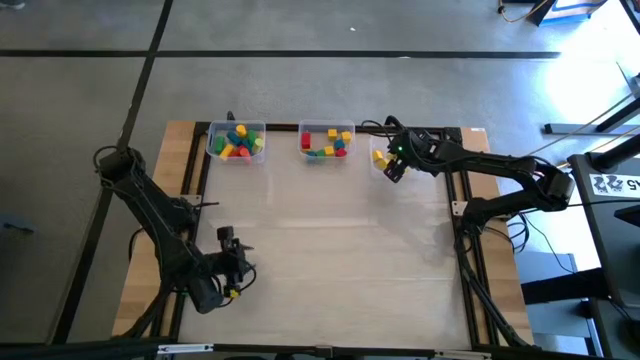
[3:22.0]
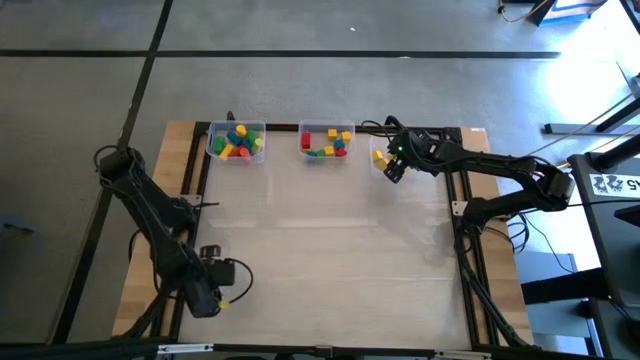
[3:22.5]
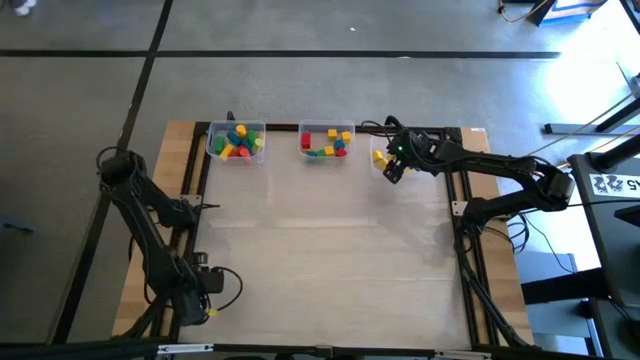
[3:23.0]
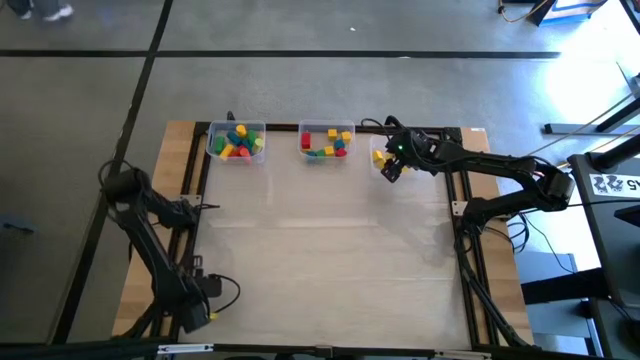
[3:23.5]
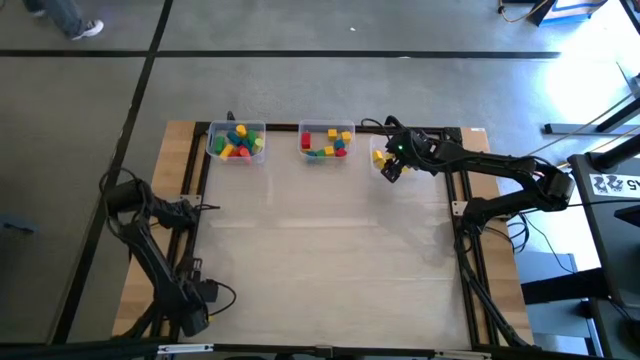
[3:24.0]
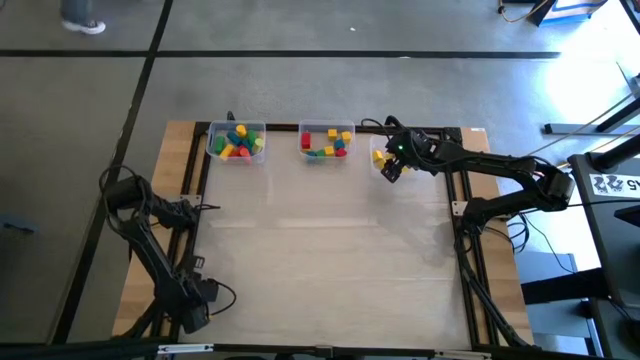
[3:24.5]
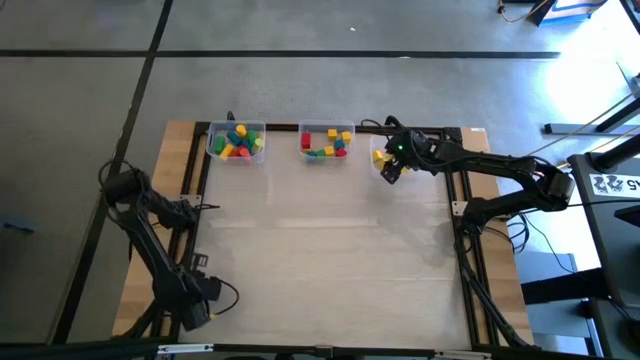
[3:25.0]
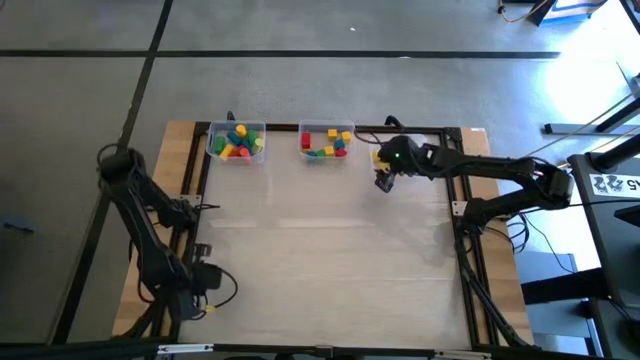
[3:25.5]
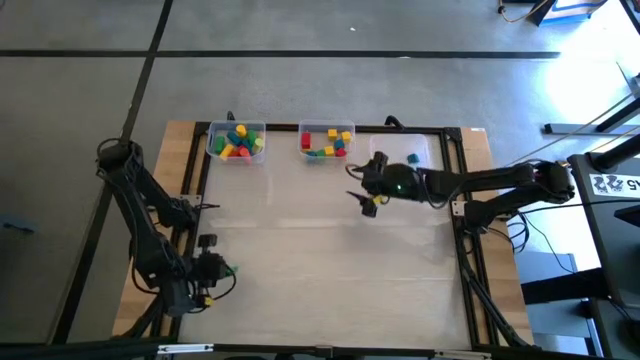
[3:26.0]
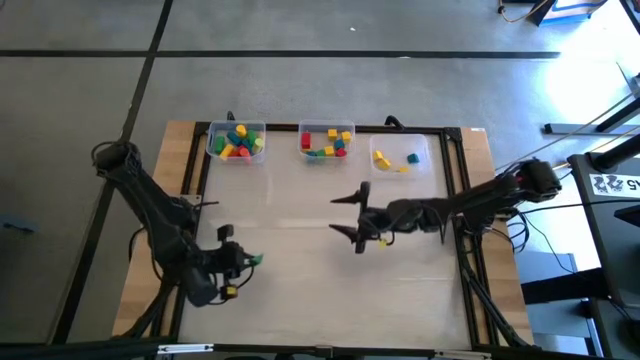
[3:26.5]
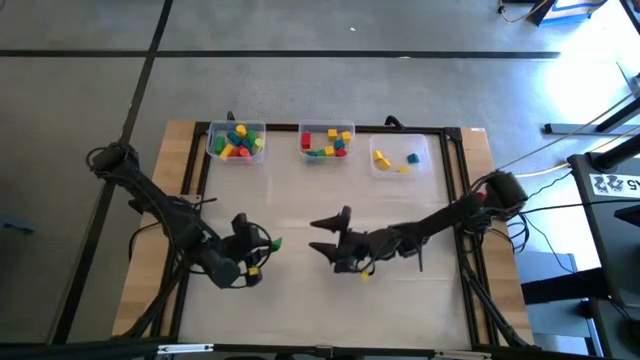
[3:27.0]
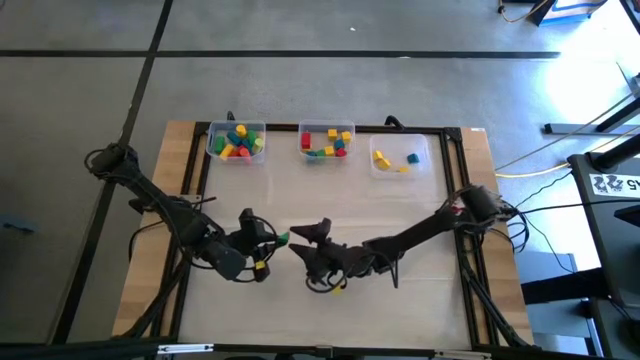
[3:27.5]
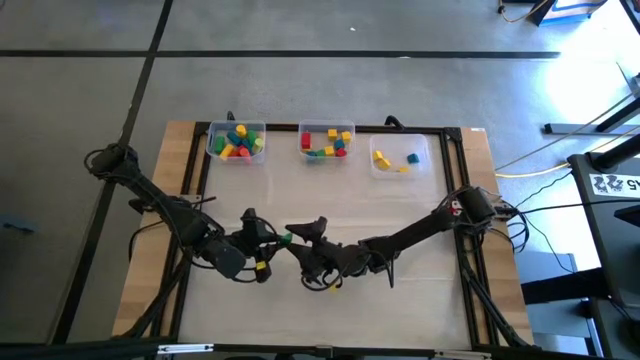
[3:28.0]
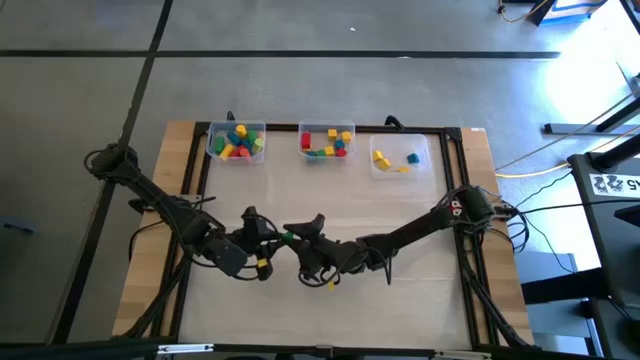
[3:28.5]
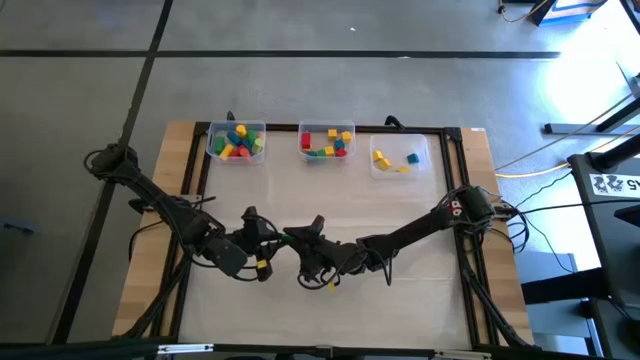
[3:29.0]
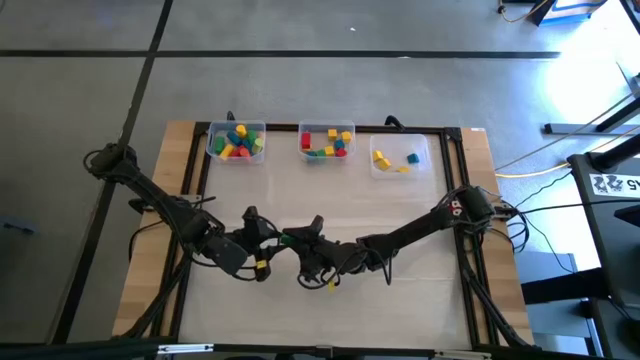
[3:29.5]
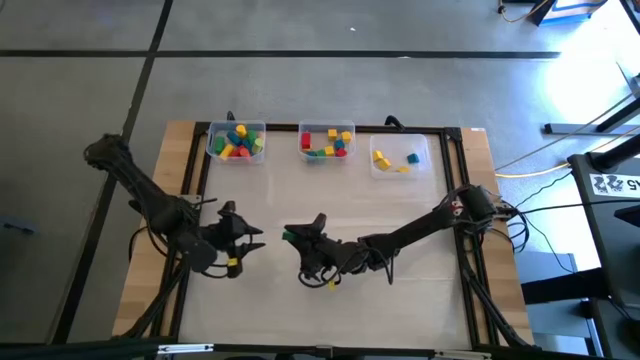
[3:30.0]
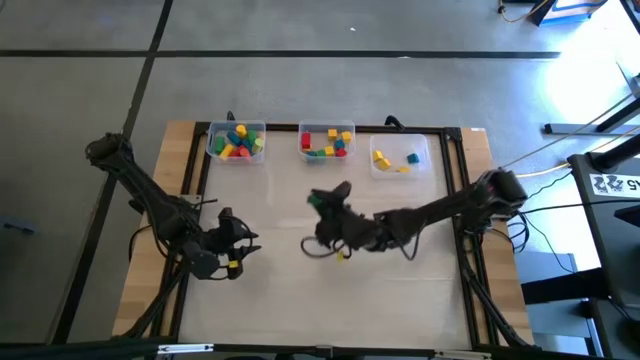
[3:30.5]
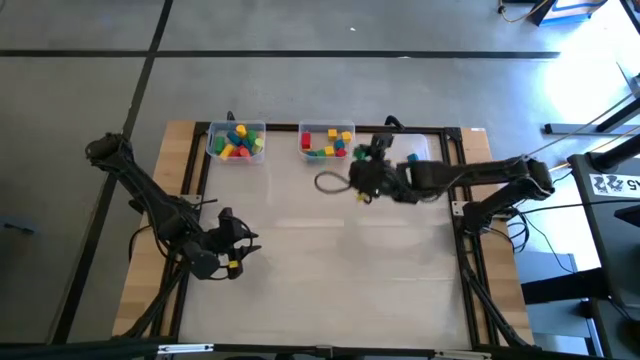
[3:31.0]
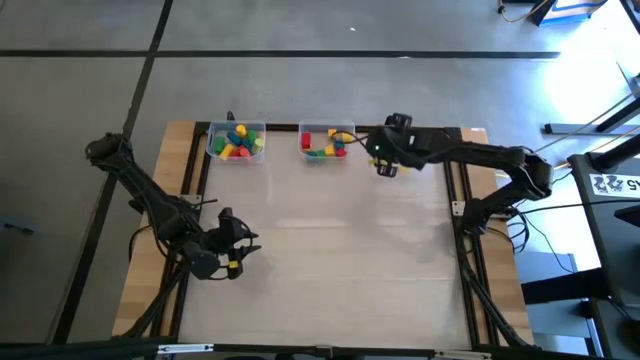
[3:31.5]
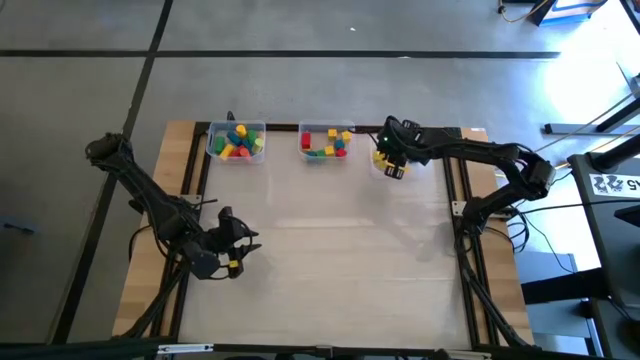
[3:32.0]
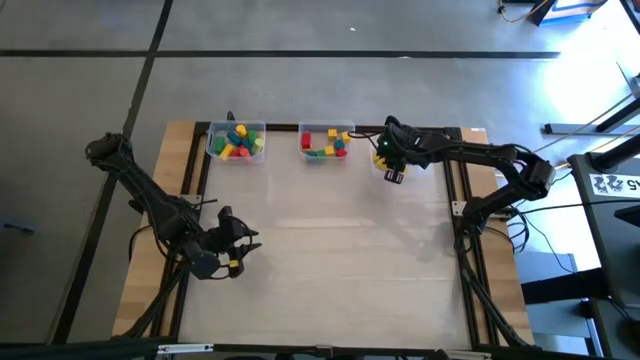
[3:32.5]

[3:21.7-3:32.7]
Task: Sort blocks by size
Put the triangular green block into the right bin

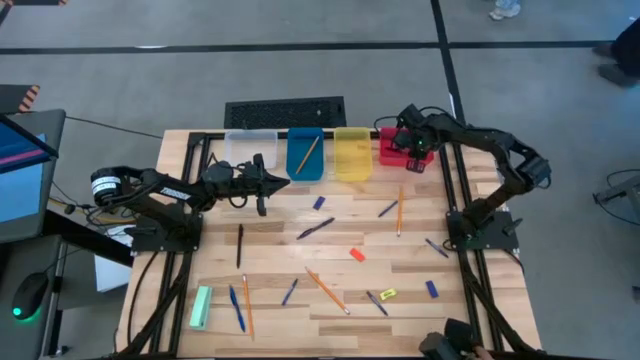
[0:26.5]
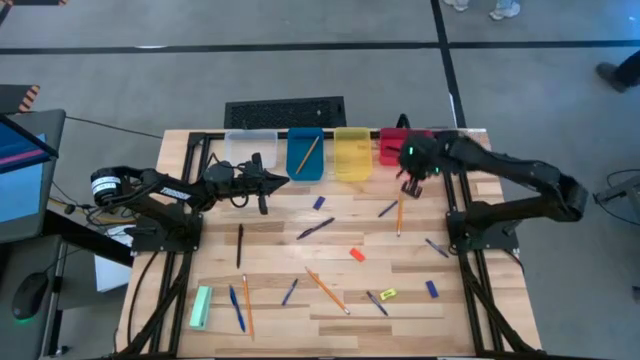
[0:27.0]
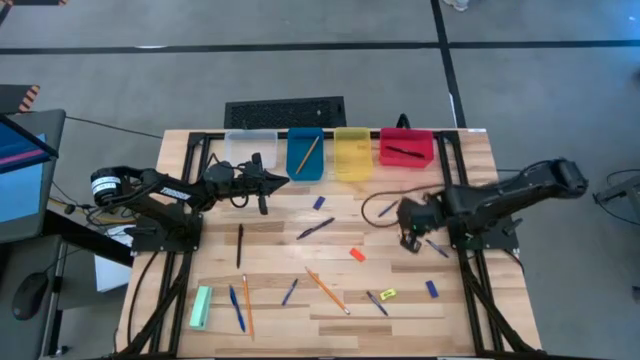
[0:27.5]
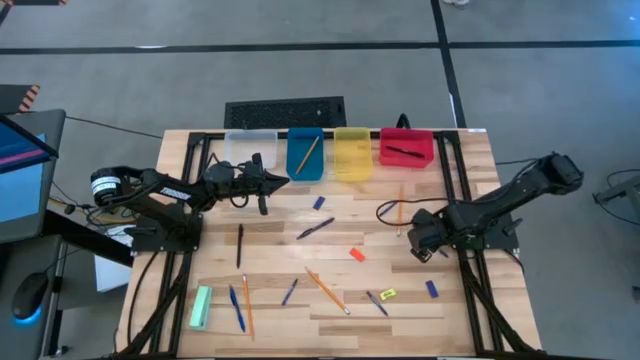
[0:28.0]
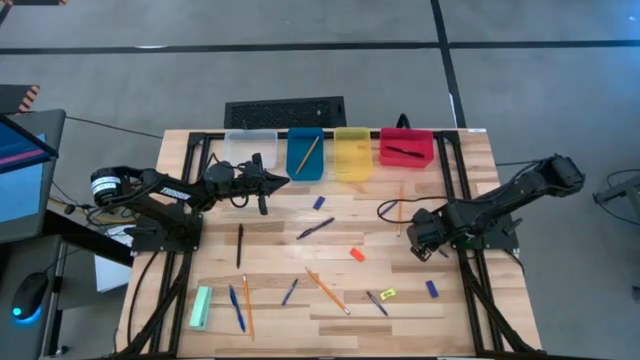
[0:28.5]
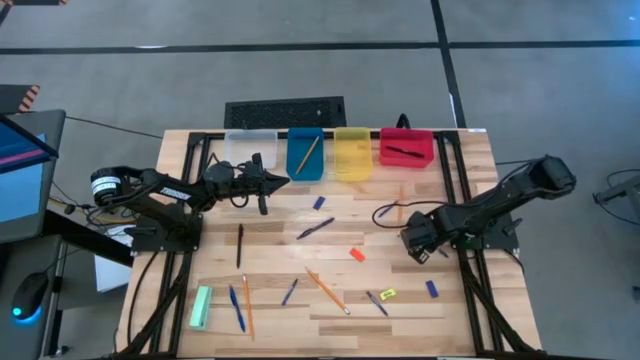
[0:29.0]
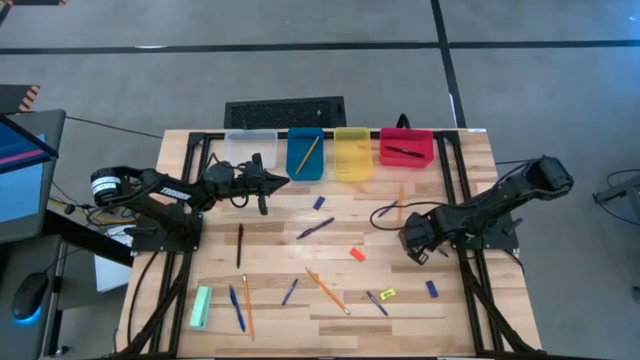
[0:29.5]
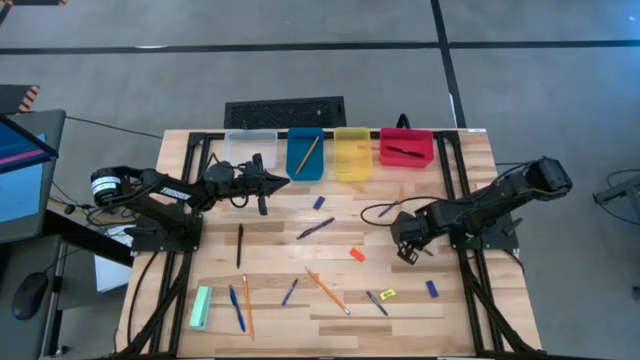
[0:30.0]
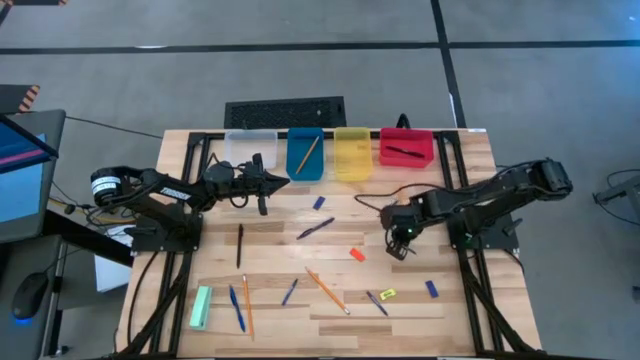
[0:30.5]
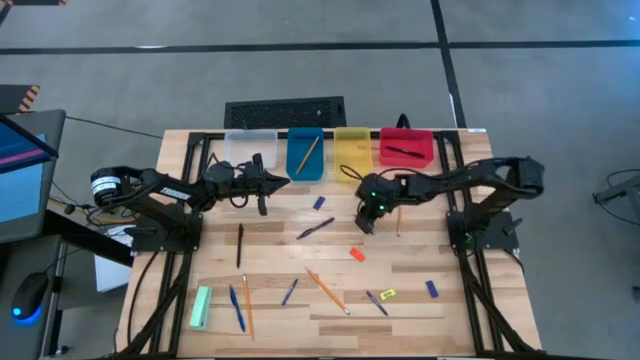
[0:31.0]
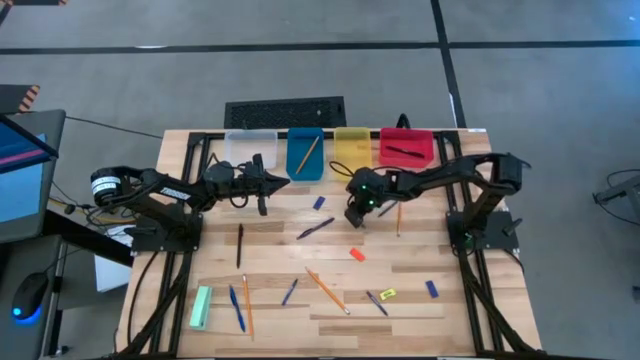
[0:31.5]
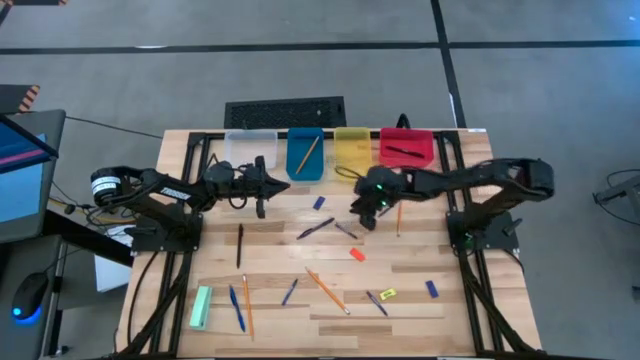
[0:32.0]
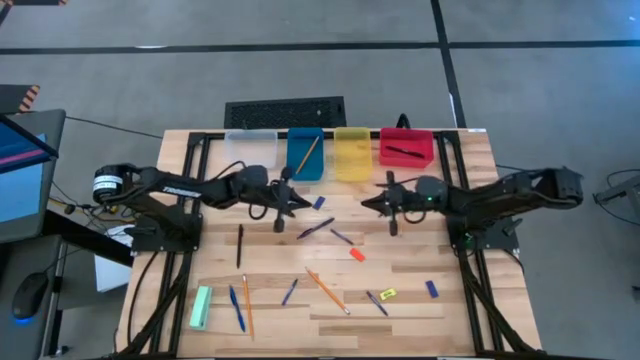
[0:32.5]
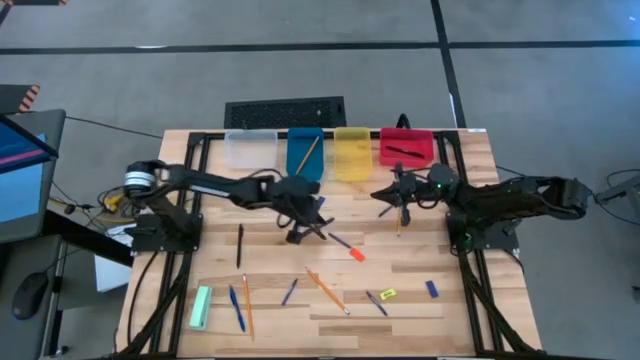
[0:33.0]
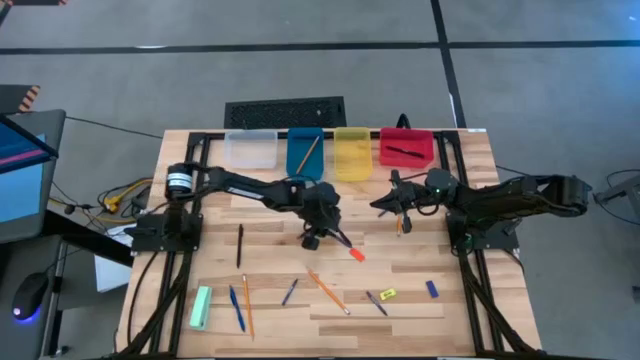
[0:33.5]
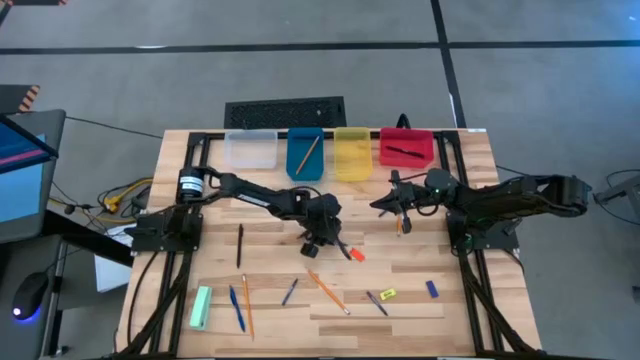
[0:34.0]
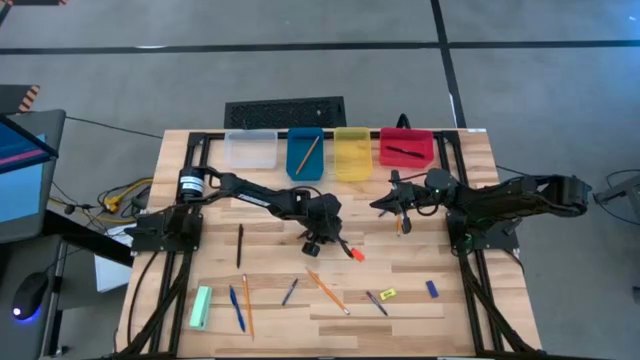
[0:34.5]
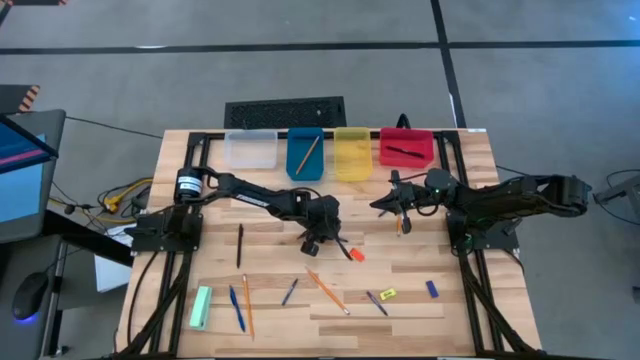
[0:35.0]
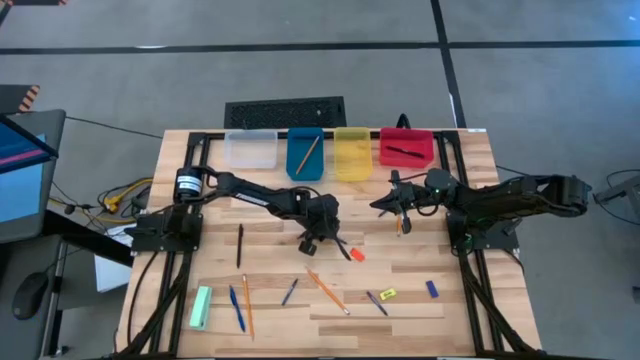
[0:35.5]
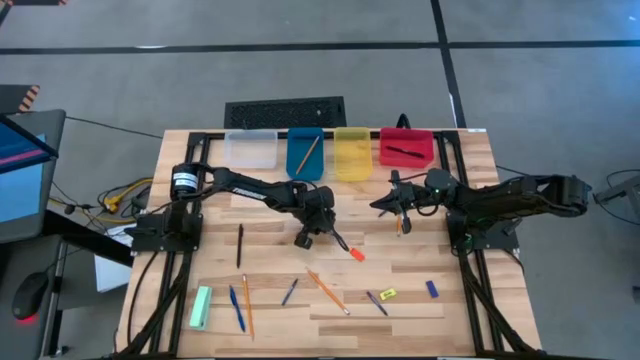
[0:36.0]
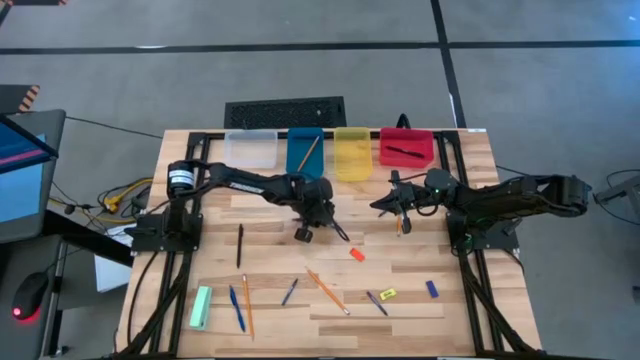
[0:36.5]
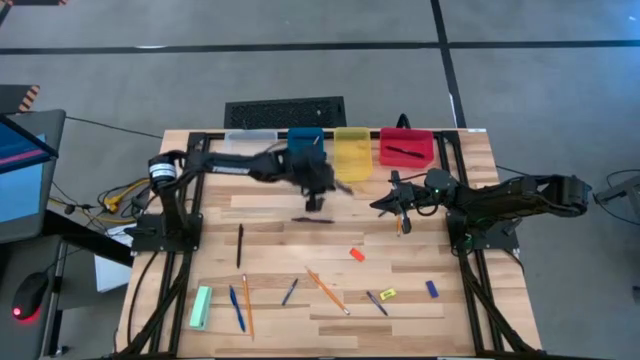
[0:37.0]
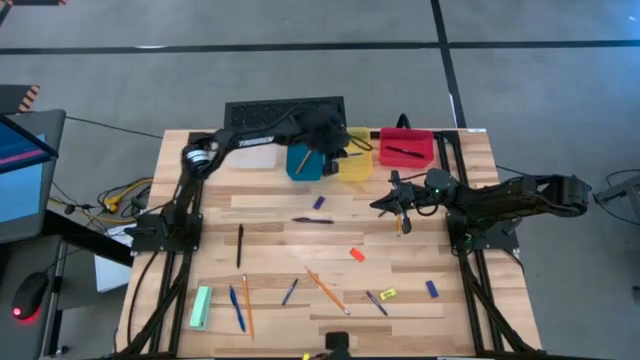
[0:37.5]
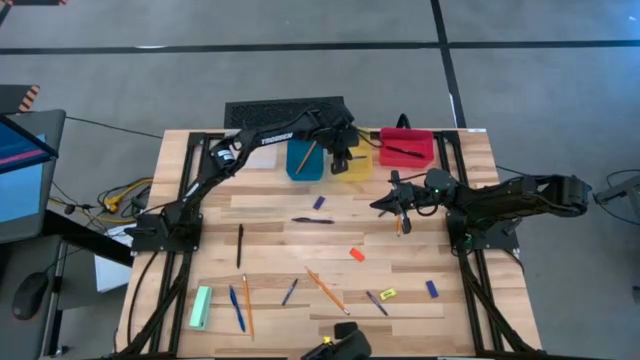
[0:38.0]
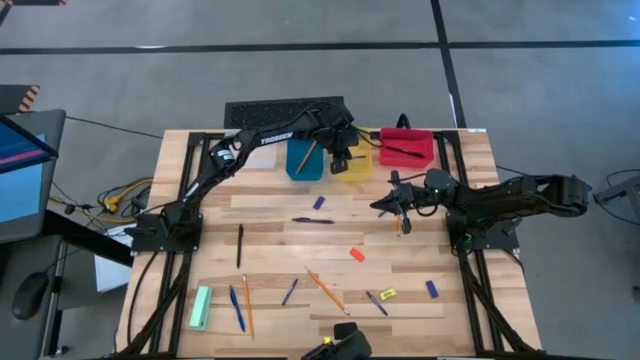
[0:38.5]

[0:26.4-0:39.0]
Task: Sort crayons/erasers/pens/pencils in bins
Put the blue crayon into the yellow bin
